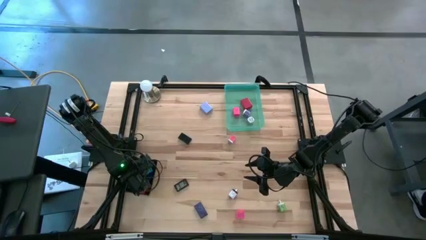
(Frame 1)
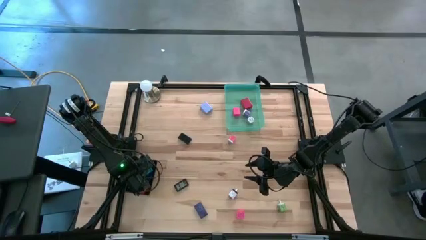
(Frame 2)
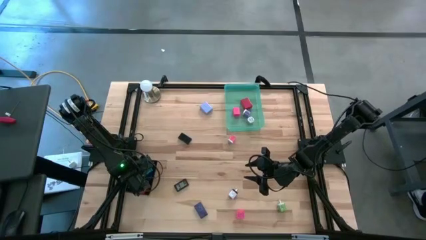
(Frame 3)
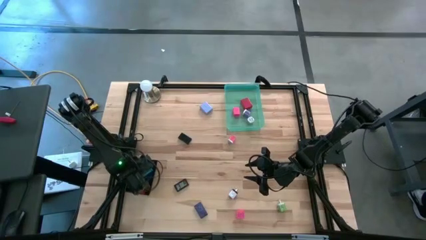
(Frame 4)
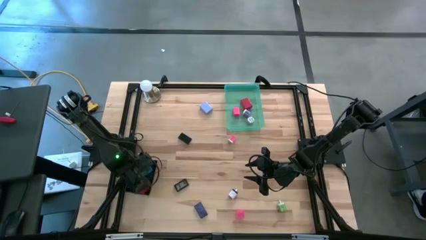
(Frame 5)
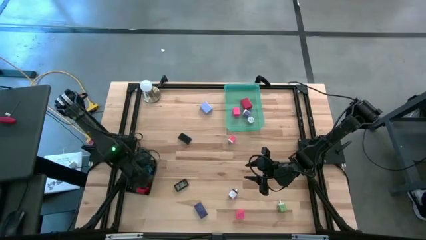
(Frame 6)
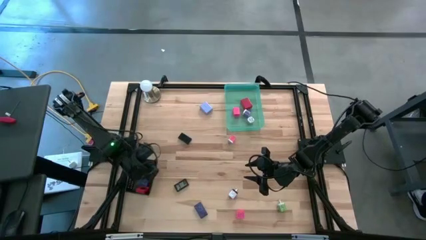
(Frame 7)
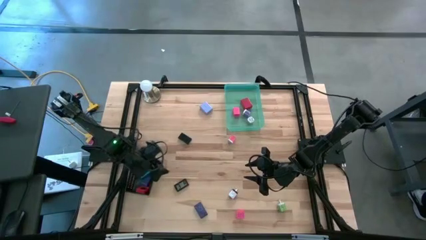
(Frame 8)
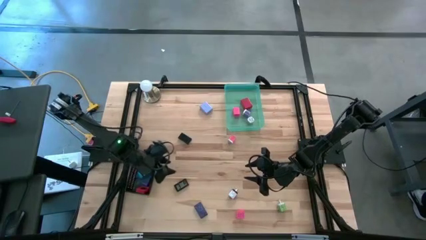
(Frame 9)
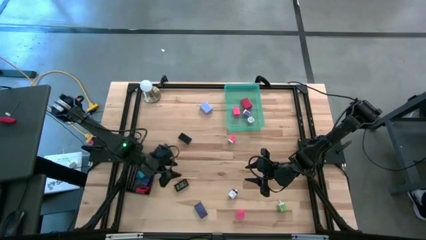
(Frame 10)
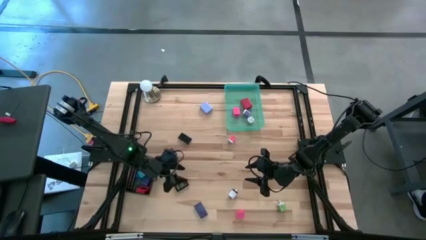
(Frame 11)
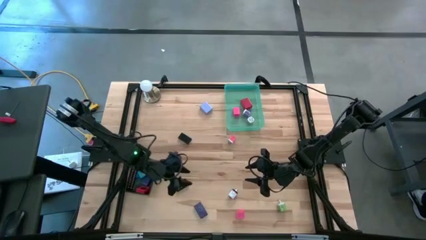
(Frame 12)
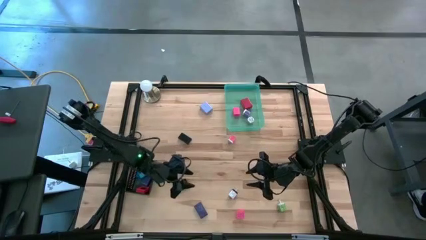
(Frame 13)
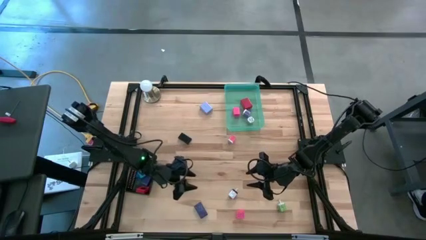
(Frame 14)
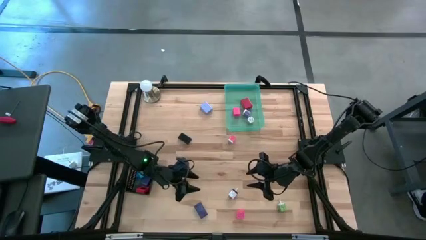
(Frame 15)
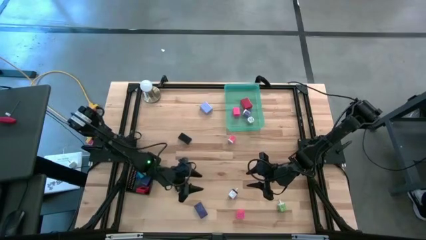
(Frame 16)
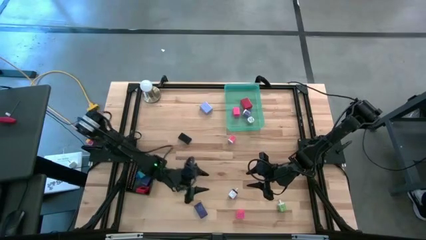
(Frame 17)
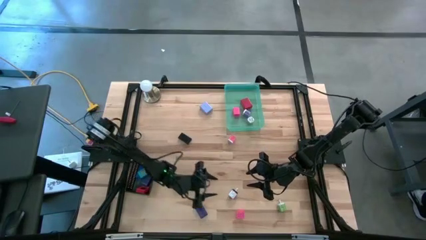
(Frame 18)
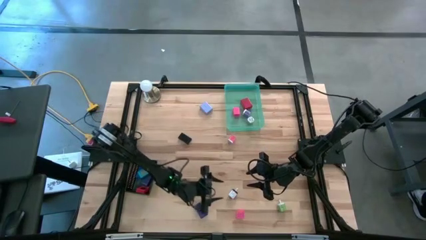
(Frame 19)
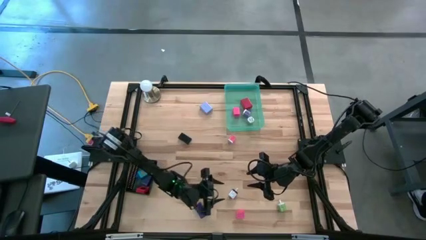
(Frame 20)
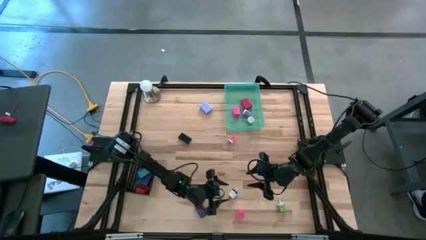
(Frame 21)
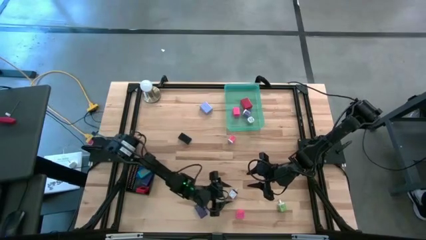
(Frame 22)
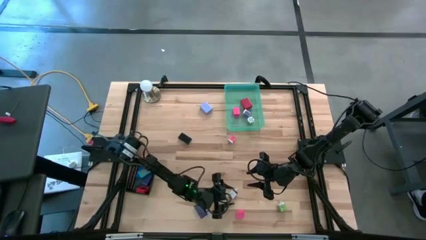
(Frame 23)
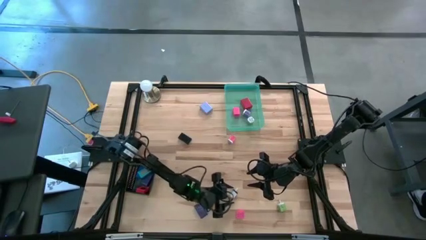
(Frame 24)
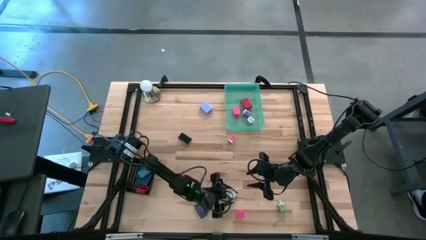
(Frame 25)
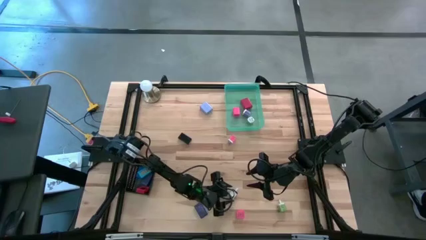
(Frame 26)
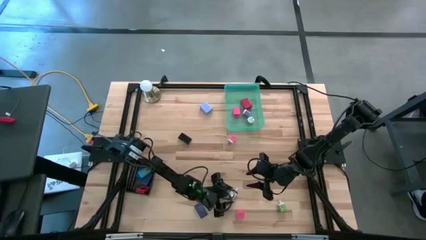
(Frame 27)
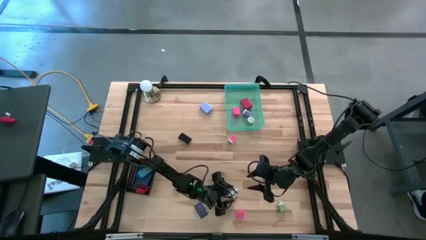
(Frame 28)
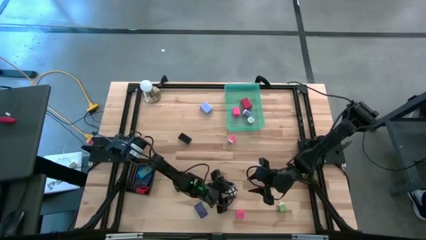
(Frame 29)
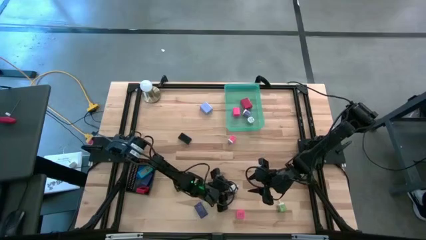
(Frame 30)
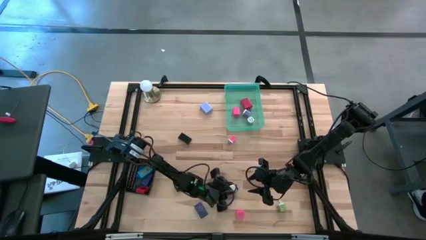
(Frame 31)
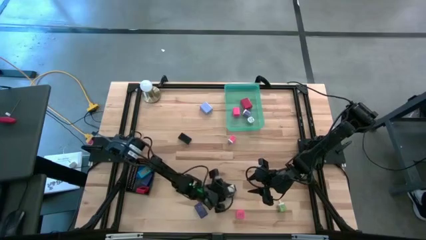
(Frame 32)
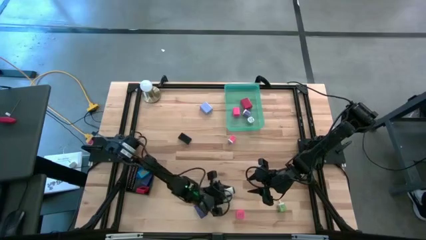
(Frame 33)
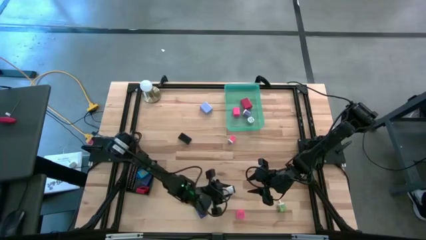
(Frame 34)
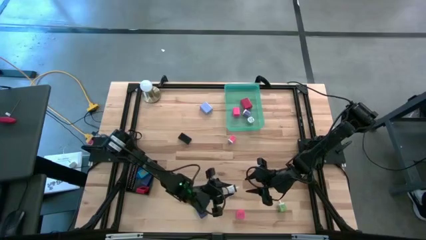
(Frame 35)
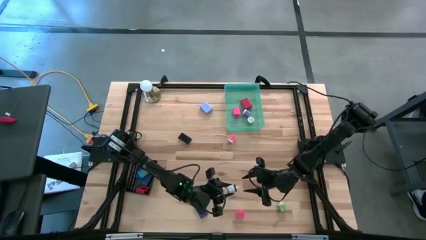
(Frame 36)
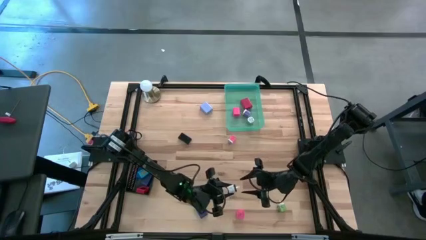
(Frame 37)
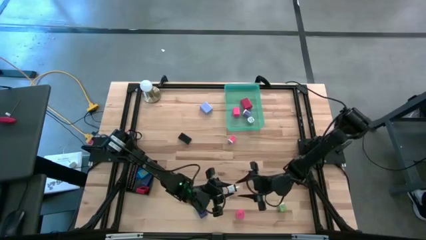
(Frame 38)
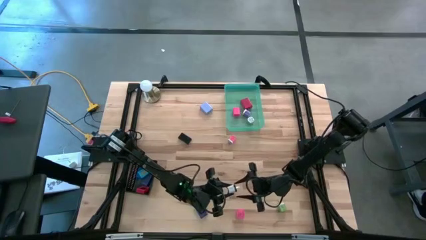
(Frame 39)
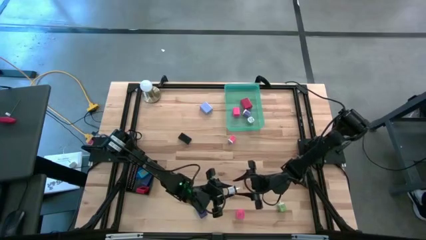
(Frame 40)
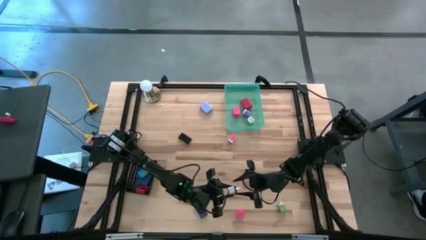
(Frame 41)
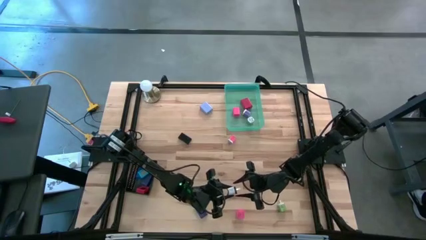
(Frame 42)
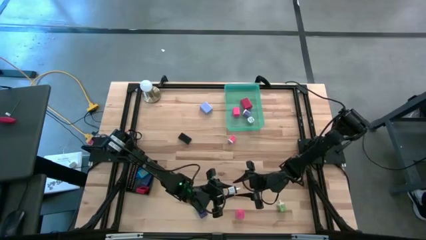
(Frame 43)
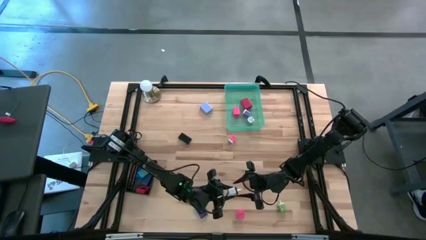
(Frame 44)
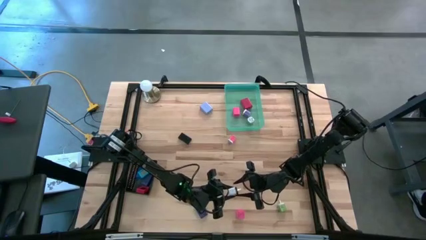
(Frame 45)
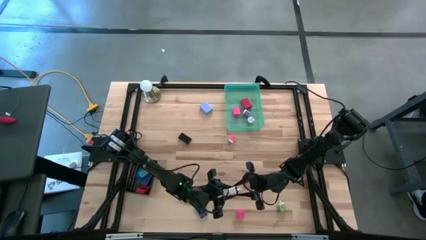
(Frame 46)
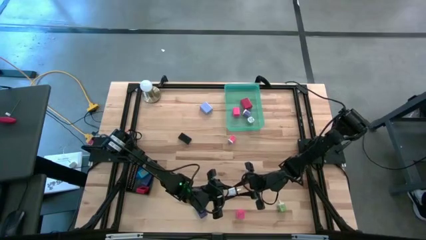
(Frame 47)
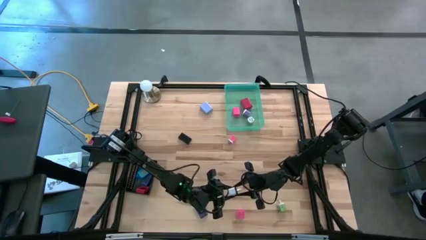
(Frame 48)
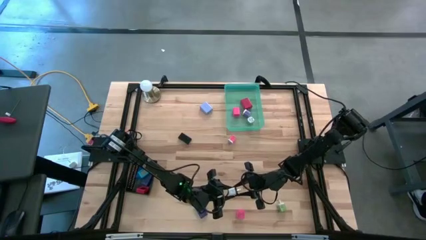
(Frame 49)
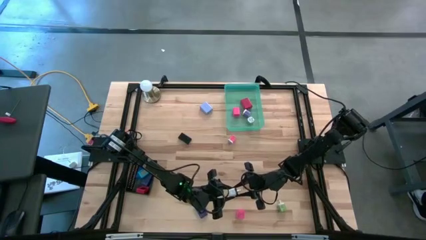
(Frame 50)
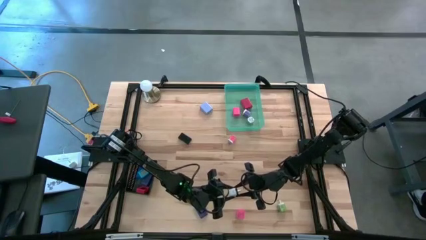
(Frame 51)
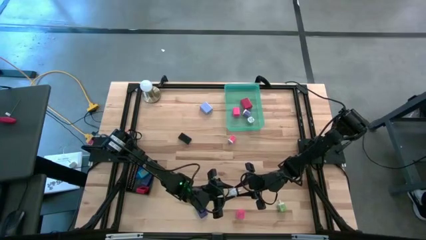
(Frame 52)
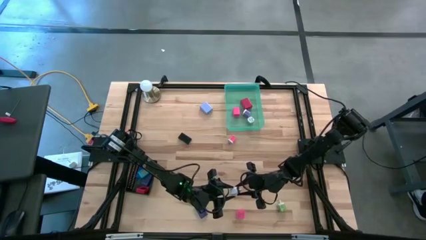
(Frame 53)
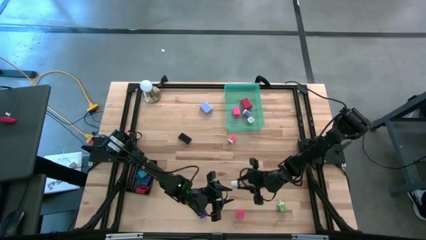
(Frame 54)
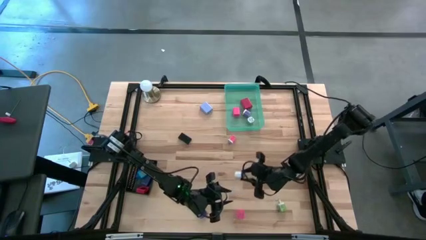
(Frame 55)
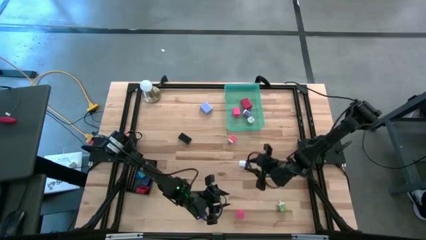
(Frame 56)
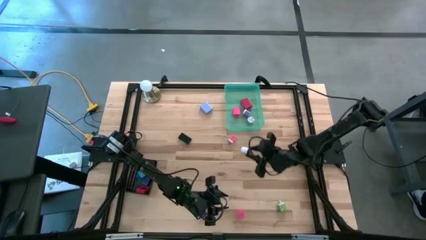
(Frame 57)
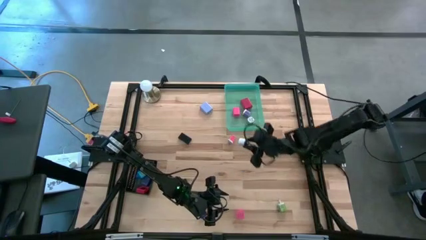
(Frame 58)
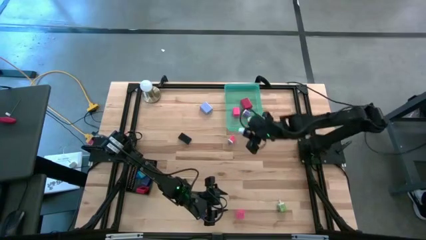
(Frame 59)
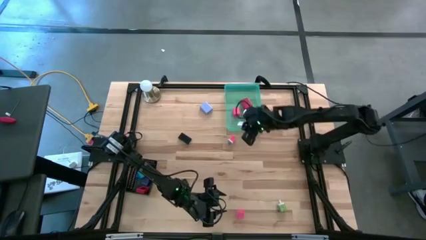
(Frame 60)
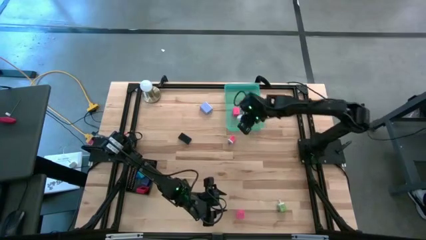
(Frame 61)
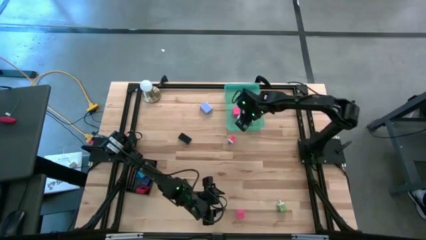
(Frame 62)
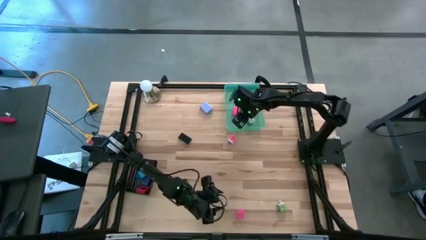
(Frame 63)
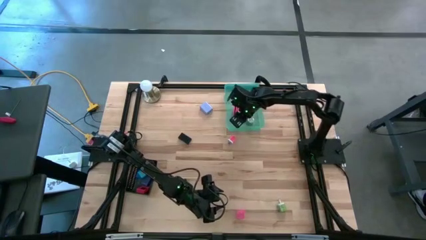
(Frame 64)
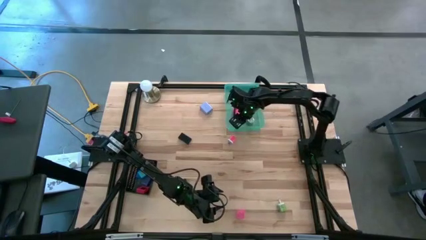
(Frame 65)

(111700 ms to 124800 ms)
Task: Pick & Place Office items
Put the white charger adapter into the green bin
